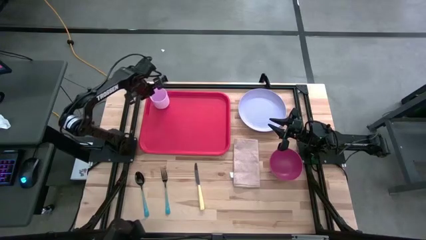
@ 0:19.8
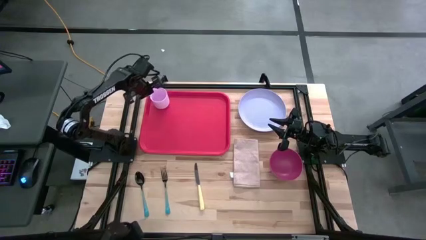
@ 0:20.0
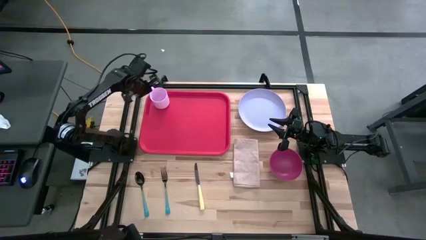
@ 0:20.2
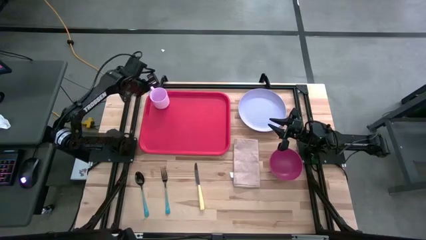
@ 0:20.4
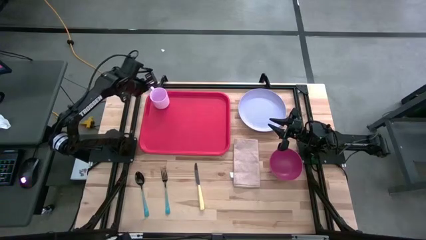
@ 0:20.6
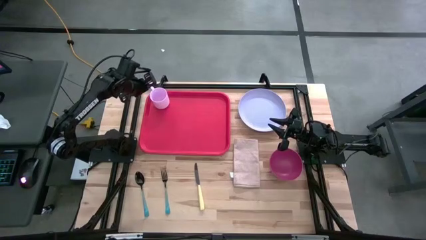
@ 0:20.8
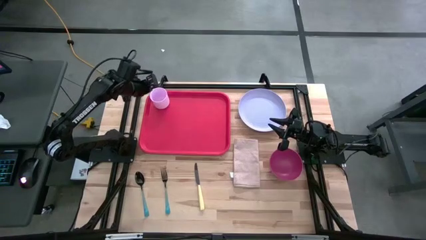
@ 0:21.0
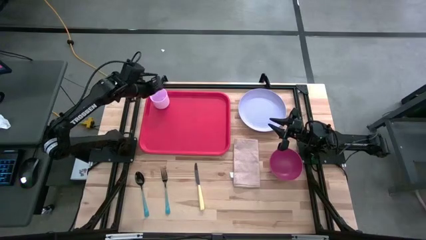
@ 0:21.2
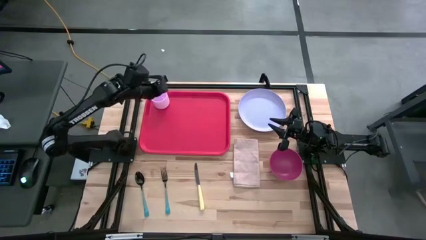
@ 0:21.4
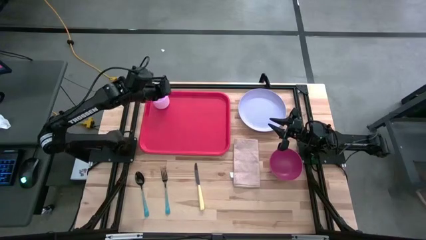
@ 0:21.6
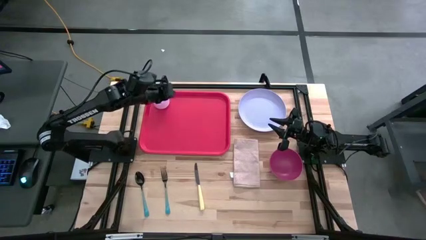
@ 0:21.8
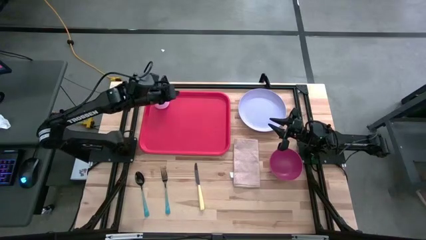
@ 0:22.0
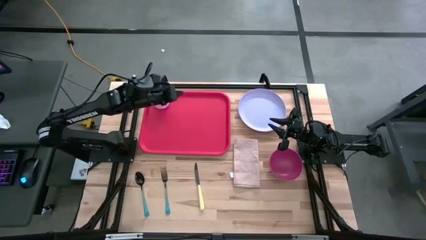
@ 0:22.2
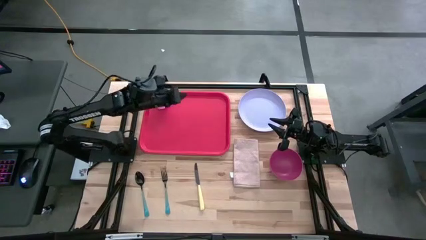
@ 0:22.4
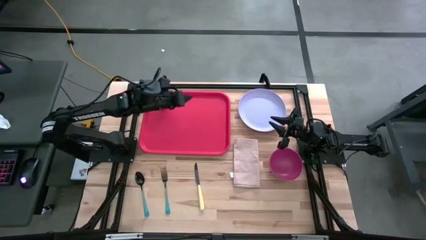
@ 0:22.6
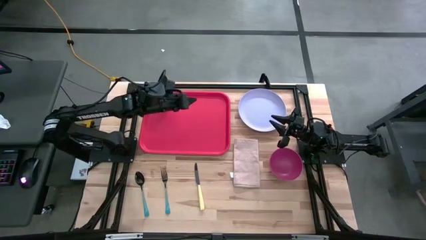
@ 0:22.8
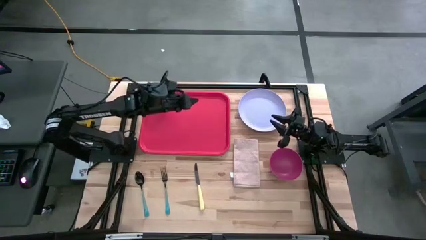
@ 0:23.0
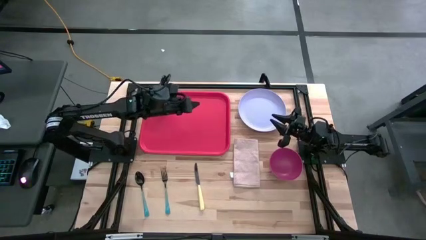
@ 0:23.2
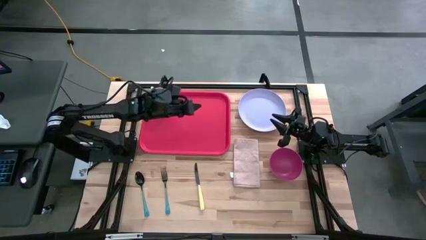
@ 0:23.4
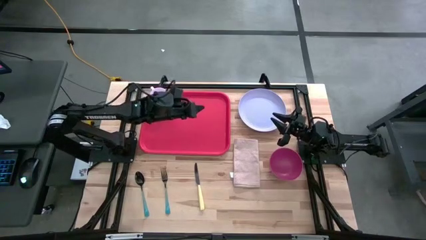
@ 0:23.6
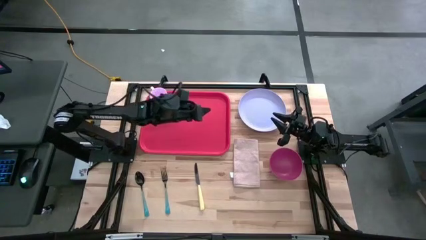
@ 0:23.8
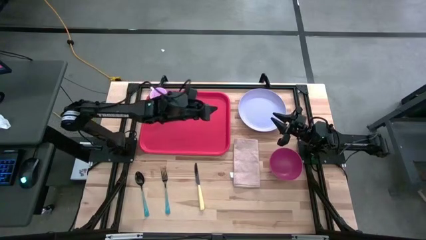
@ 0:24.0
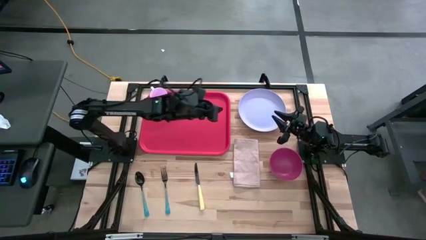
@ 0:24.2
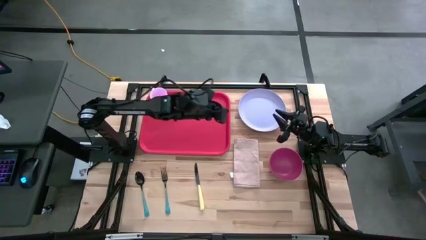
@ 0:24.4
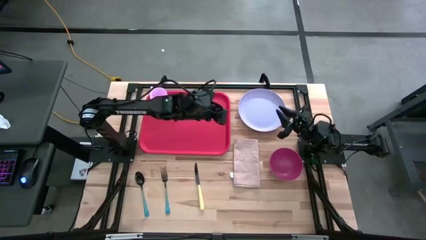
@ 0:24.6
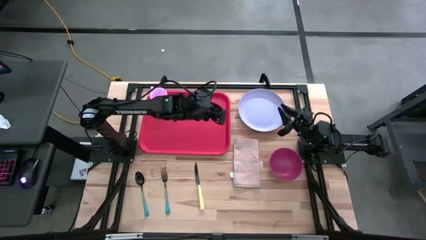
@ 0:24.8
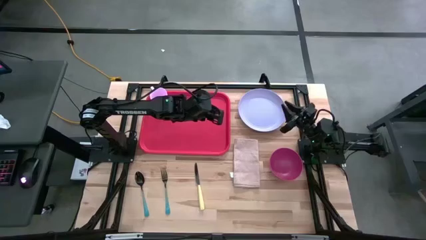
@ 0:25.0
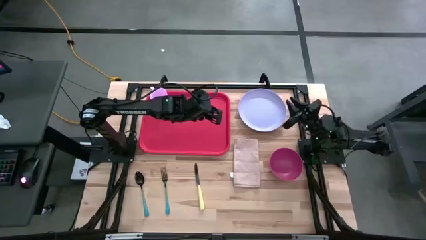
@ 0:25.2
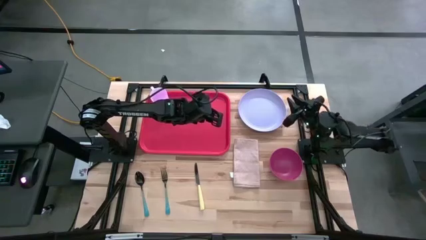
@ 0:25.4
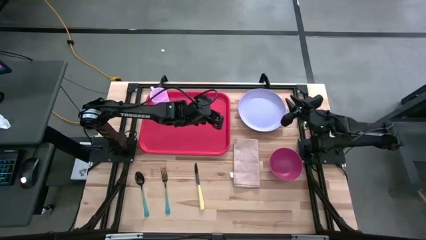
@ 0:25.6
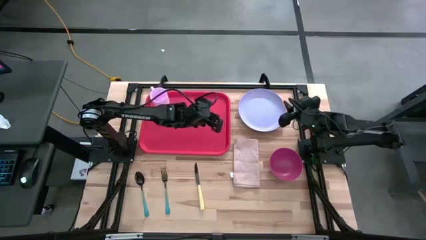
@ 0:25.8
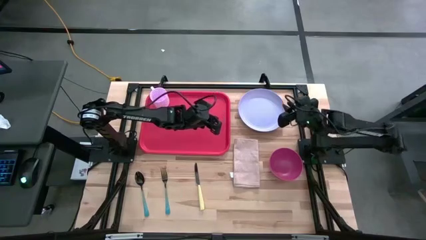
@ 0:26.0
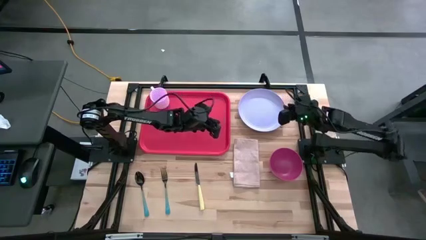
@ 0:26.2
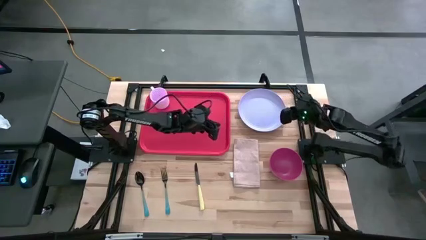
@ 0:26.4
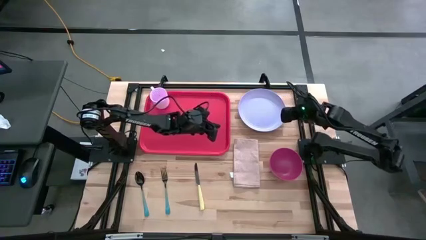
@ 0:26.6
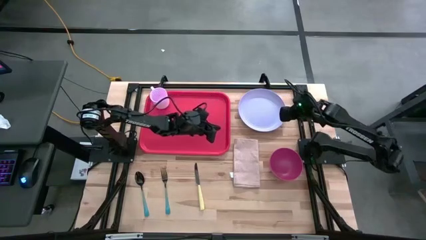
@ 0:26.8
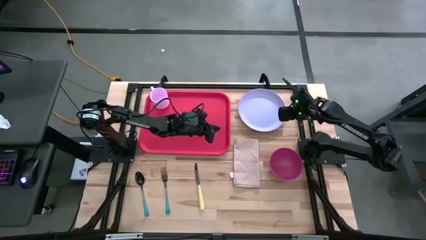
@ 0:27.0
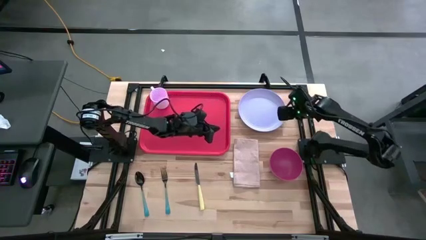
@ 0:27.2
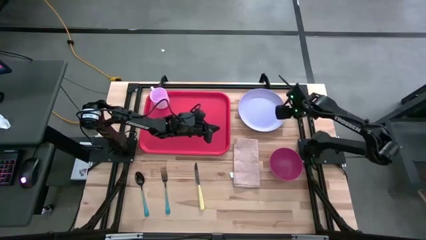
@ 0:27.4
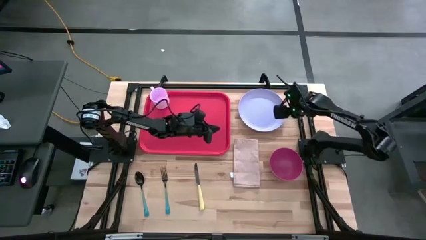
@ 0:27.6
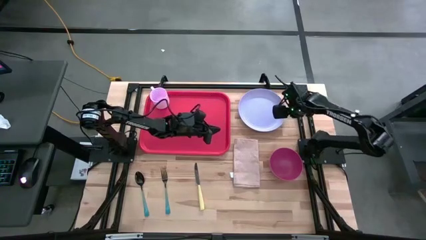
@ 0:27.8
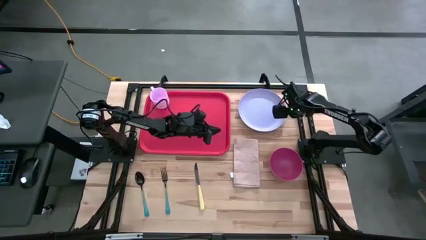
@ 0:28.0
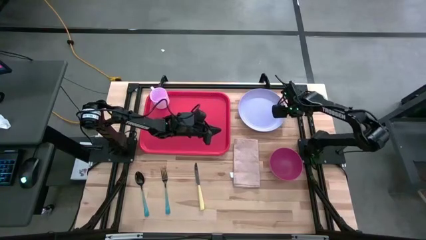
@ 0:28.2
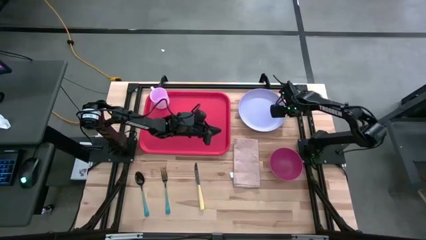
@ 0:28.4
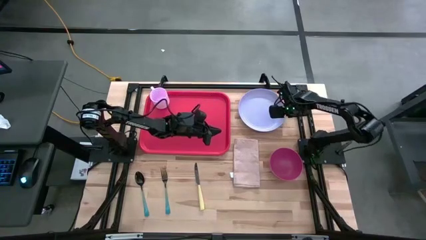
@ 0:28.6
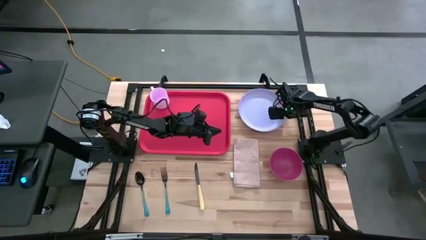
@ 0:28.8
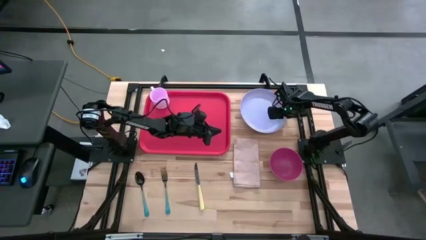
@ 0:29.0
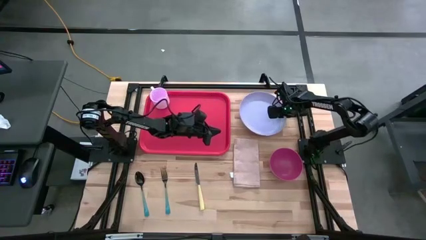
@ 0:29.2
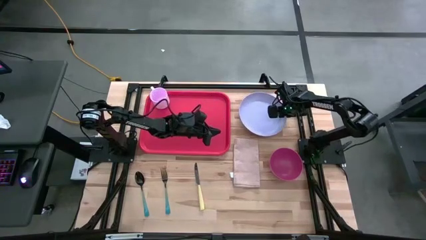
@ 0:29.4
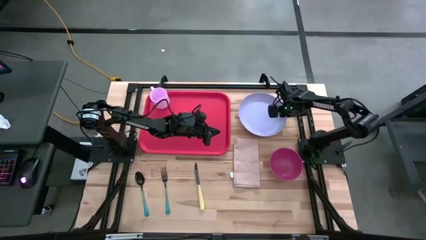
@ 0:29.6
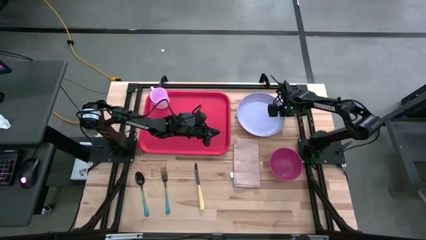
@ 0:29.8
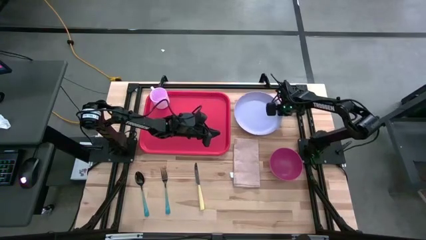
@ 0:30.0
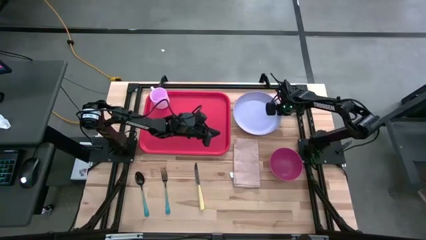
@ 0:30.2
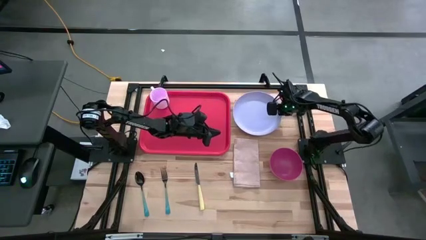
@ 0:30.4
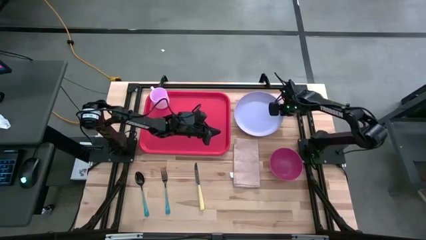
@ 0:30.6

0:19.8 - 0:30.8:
Task: Set up tray
Put the violet plate below the pink mug on the red tray
